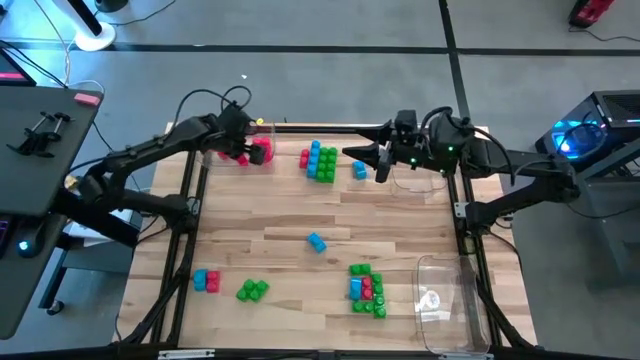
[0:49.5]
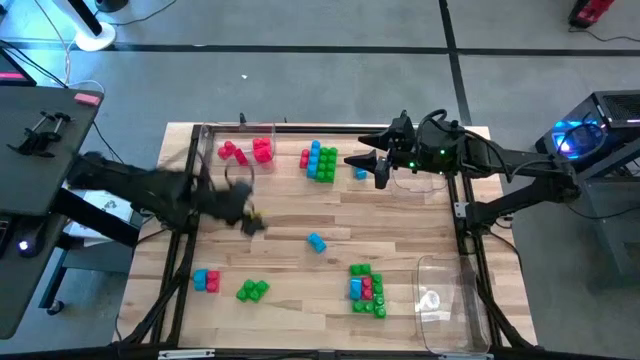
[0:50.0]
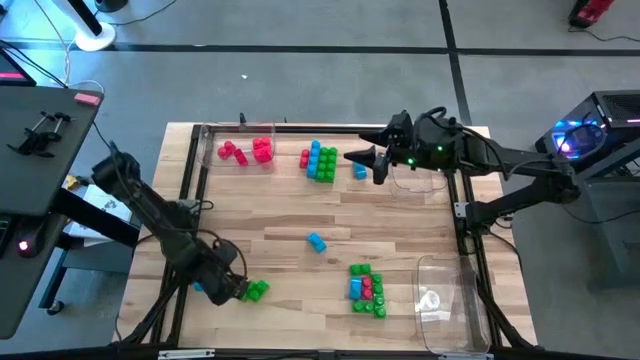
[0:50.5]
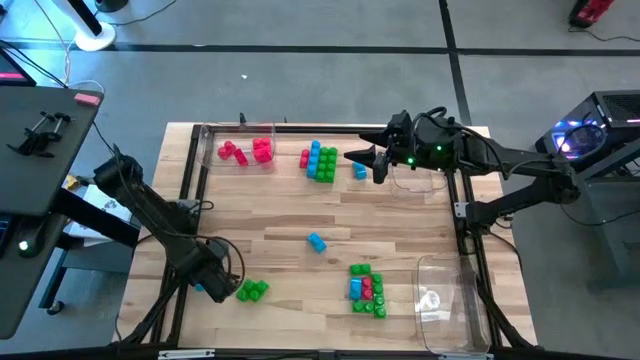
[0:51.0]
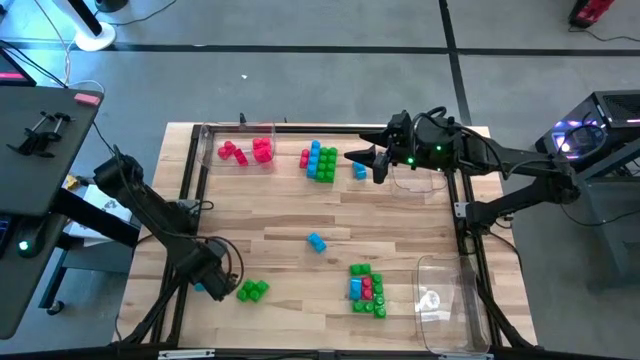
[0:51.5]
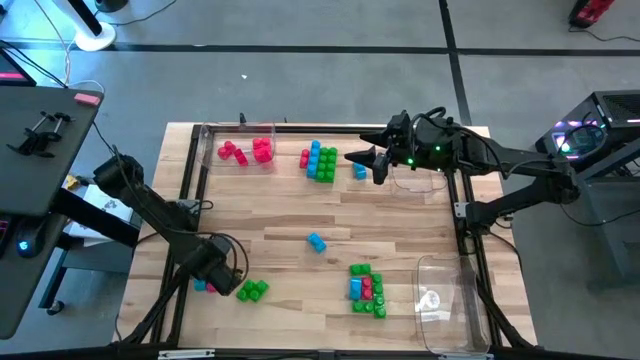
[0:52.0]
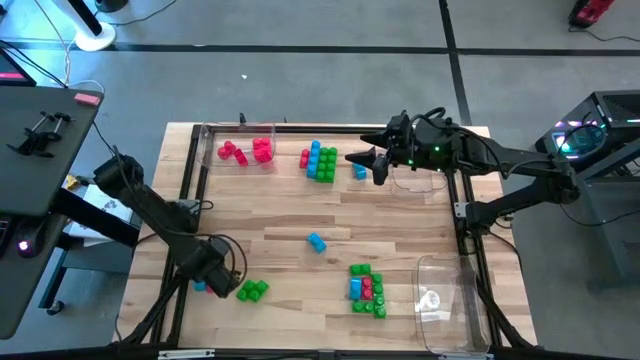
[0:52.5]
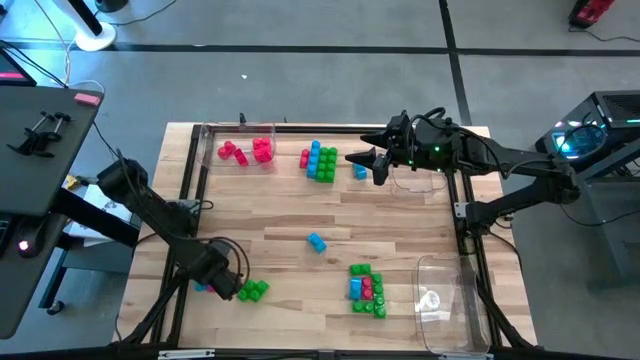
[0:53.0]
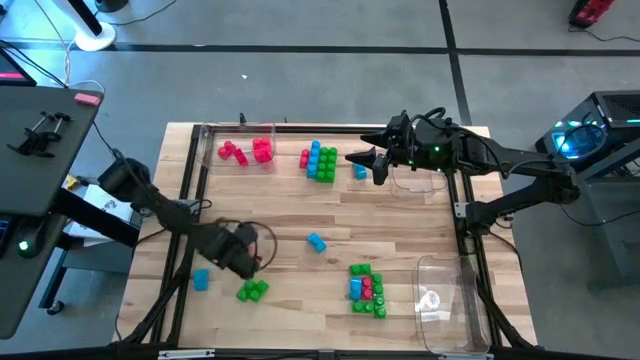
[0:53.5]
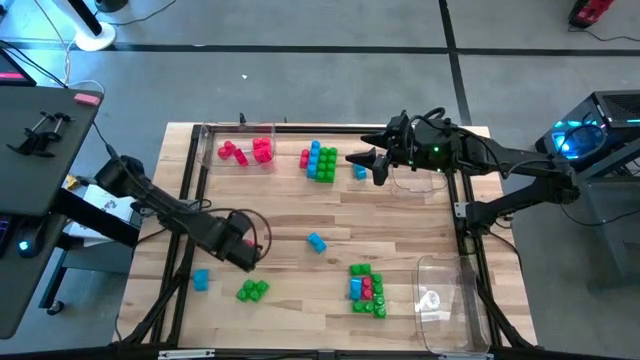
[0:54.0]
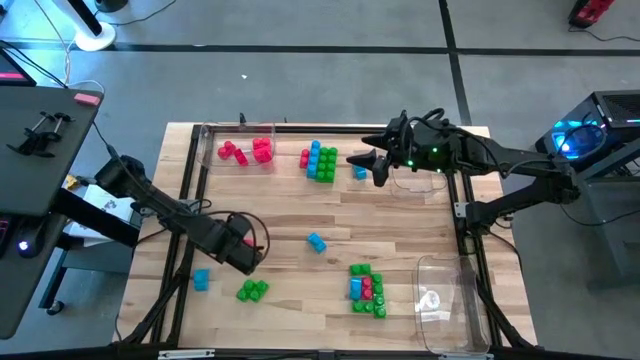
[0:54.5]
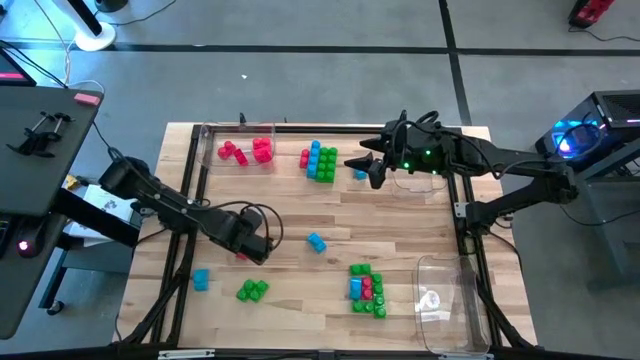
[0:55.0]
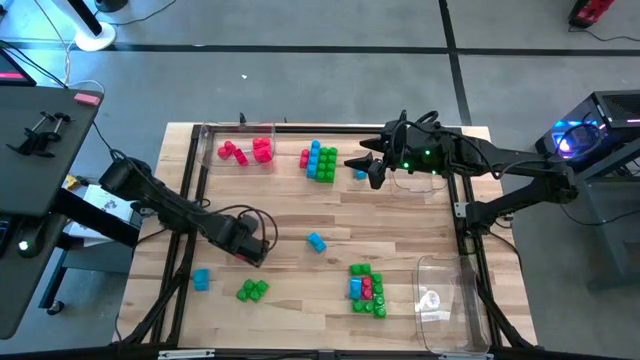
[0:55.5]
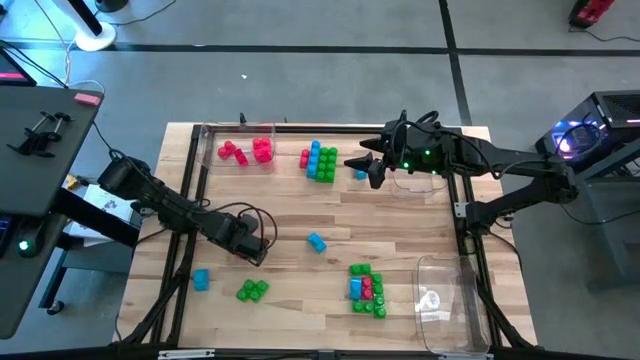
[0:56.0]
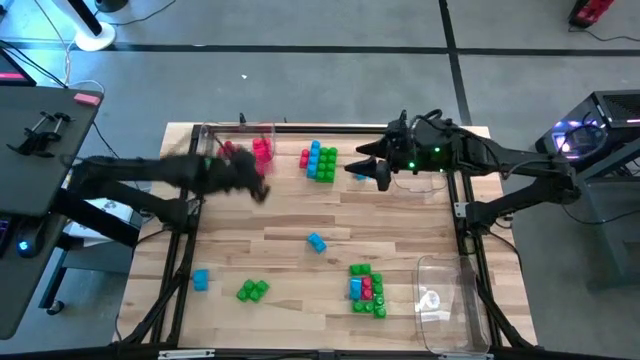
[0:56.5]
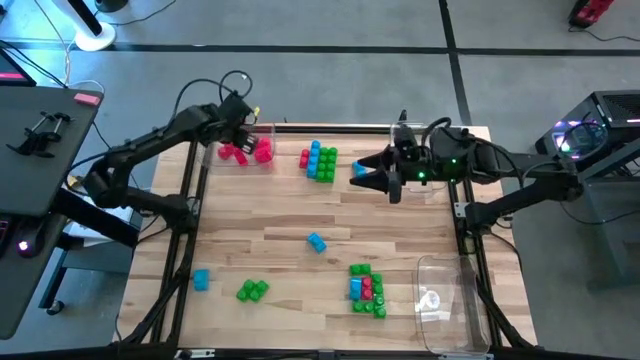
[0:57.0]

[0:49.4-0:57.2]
Task: Sort blocks
Put the game piece into the top left transparent bin

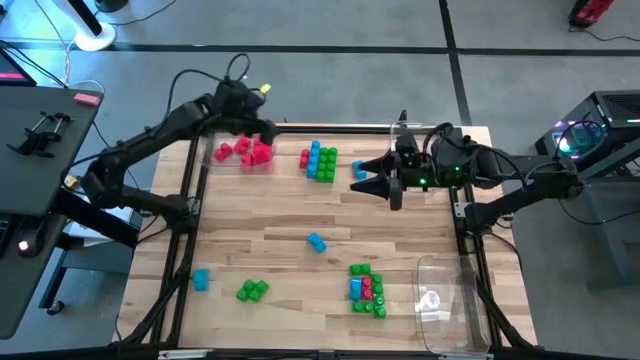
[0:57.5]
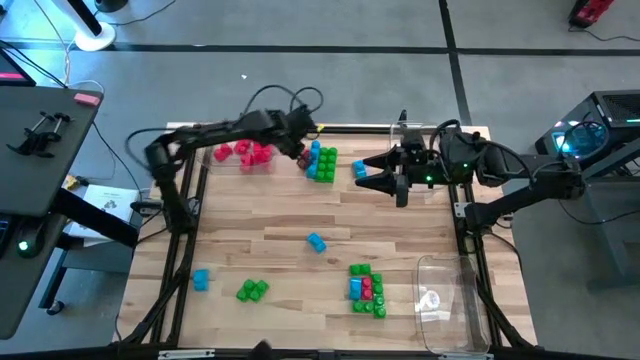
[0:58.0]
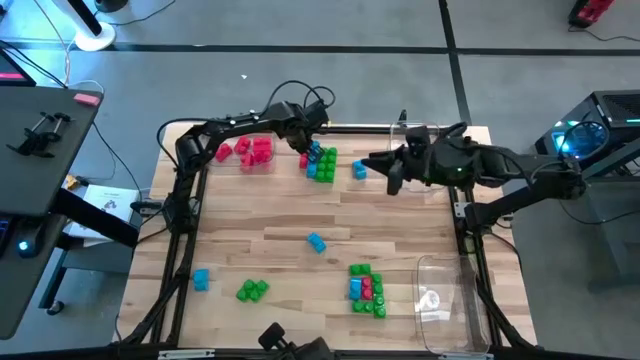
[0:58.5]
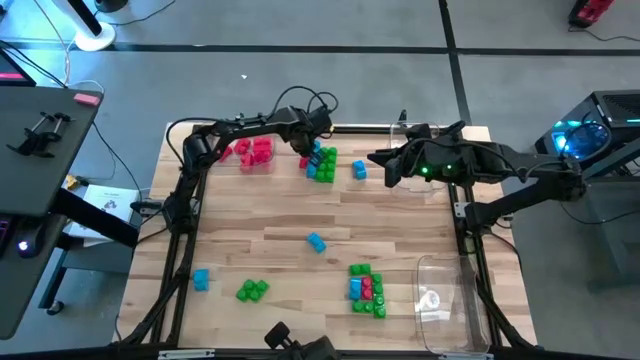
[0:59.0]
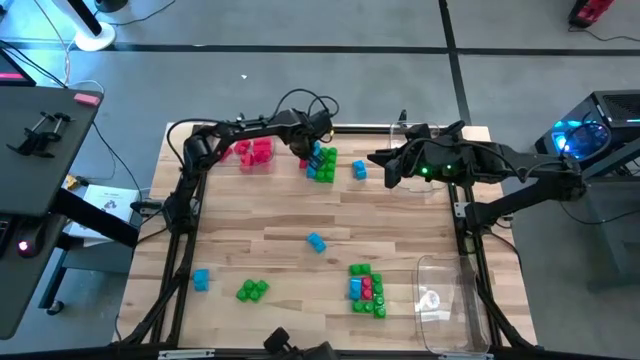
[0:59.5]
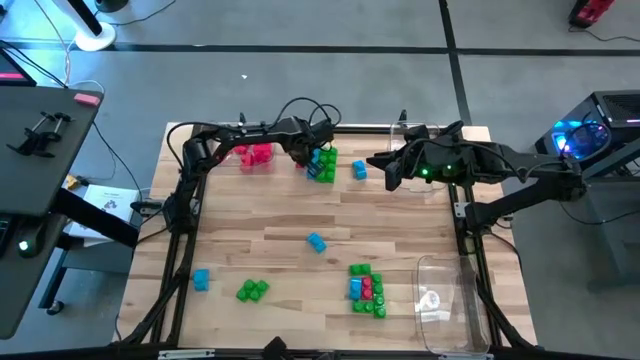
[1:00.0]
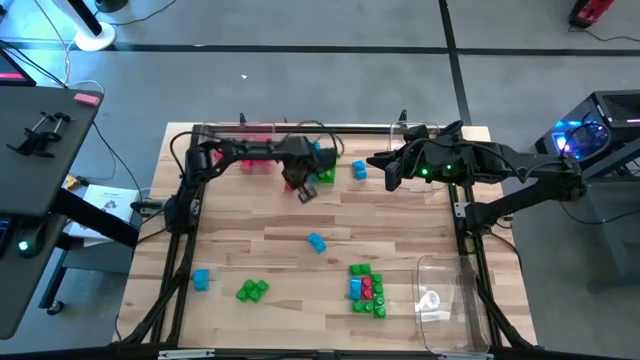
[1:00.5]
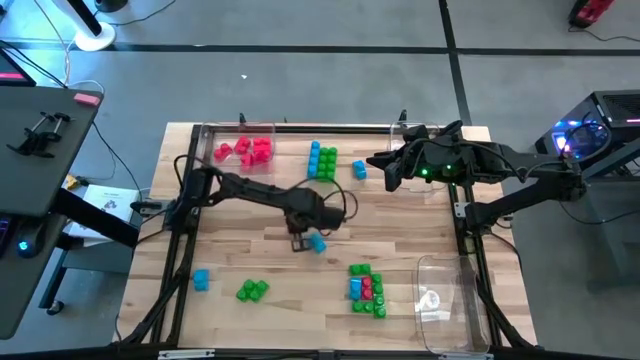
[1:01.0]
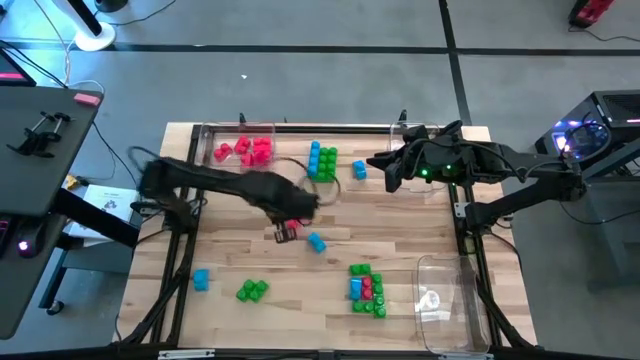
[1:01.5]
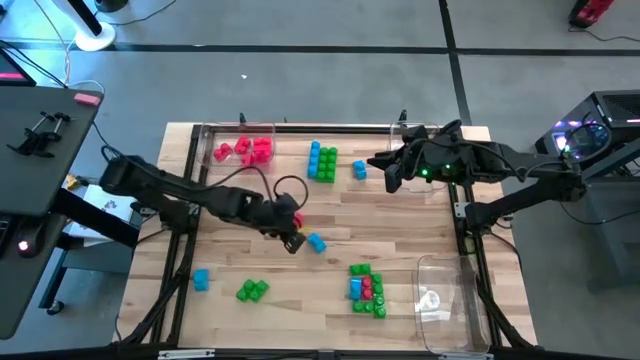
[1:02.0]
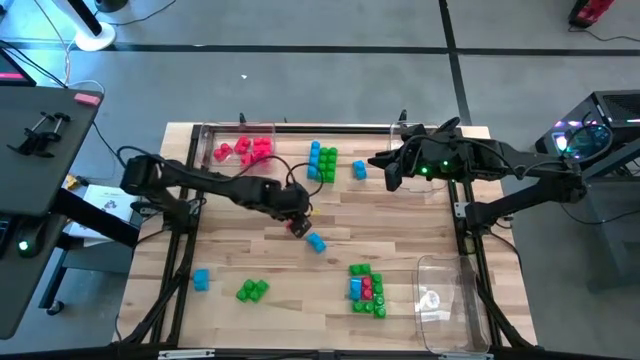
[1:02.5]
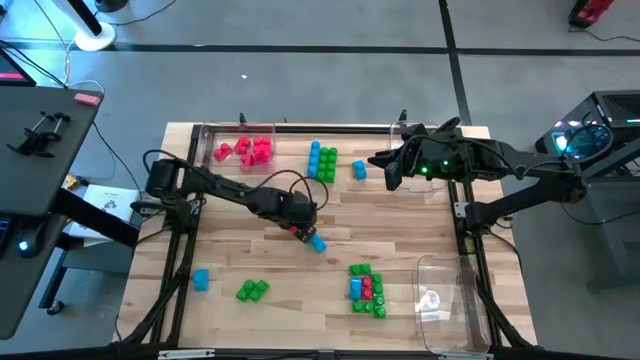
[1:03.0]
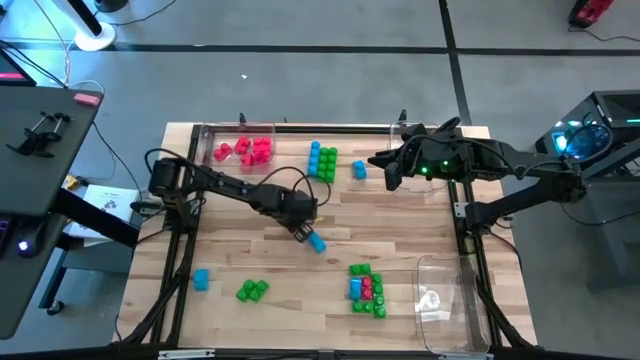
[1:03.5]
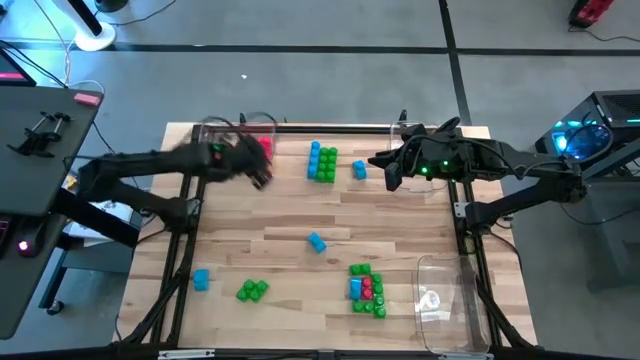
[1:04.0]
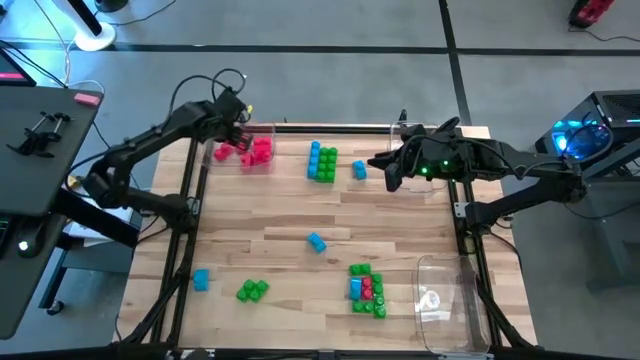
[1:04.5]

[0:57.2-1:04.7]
Put the game piece into the top left transparent bin

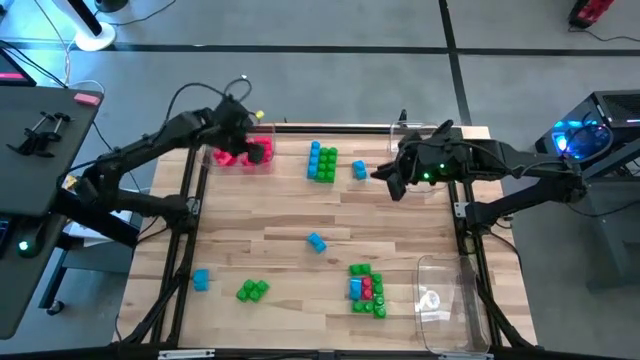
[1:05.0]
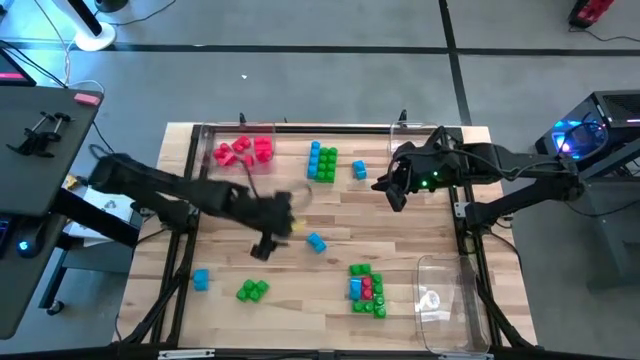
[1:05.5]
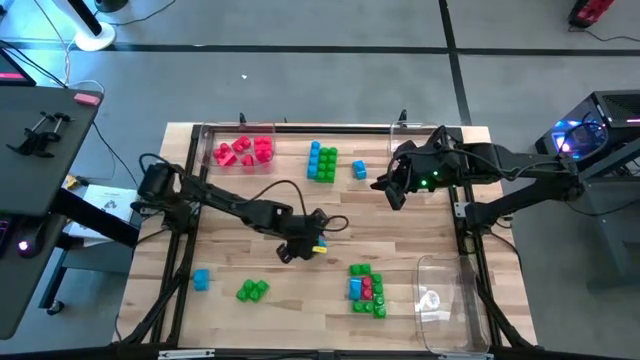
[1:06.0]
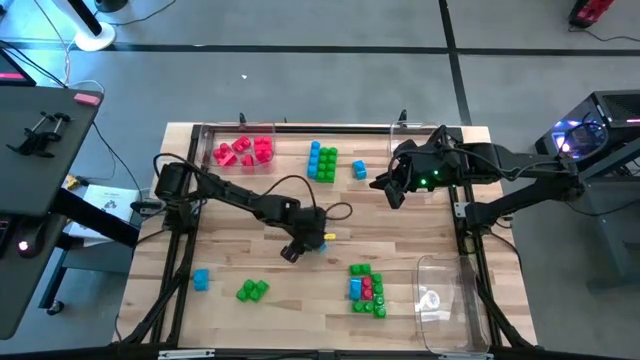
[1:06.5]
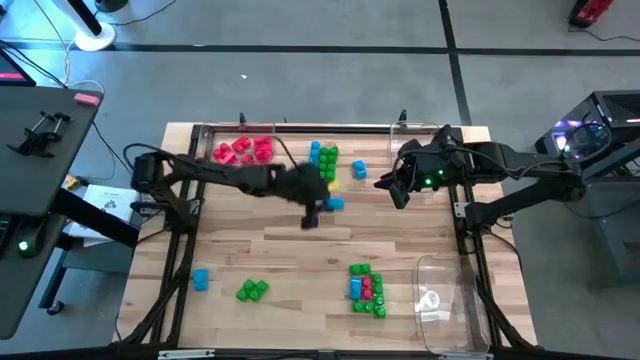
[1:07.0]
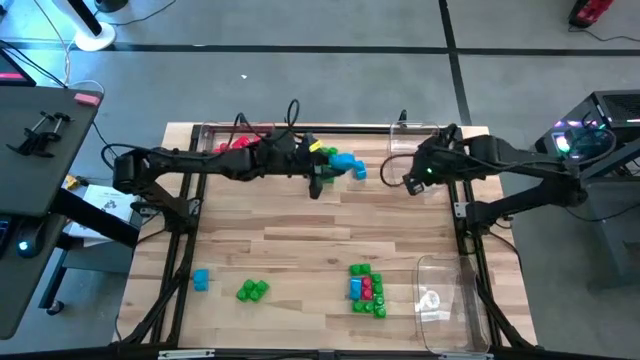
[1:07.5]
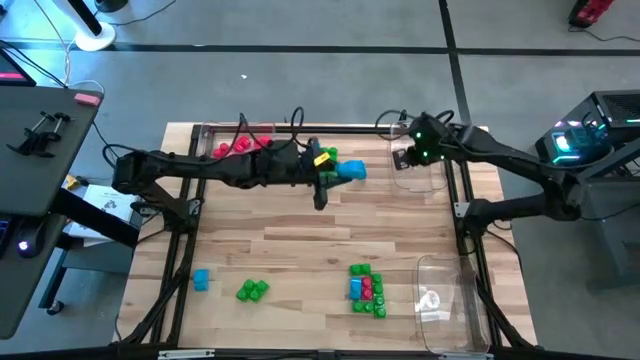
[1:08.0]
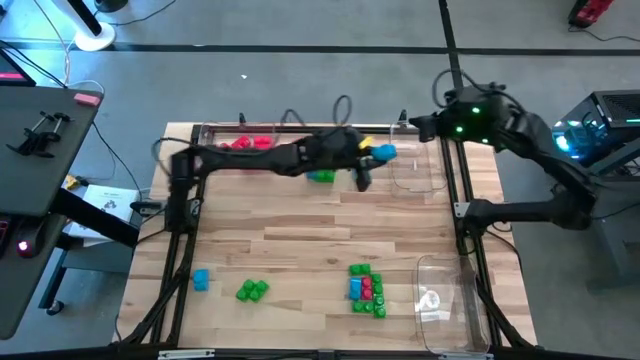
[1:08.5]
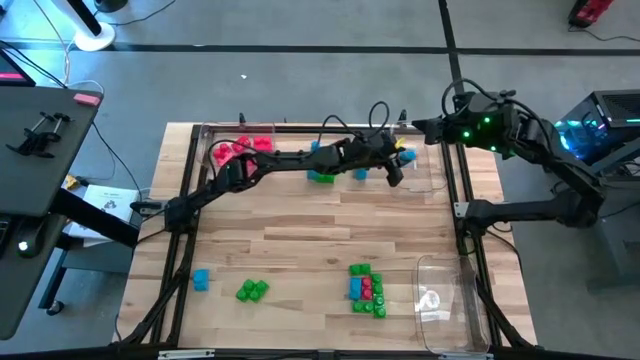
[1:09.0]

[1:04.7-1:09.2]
Put the blue game piece into the top right transparent bin

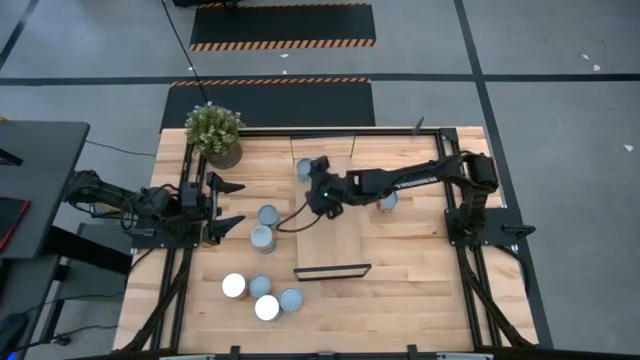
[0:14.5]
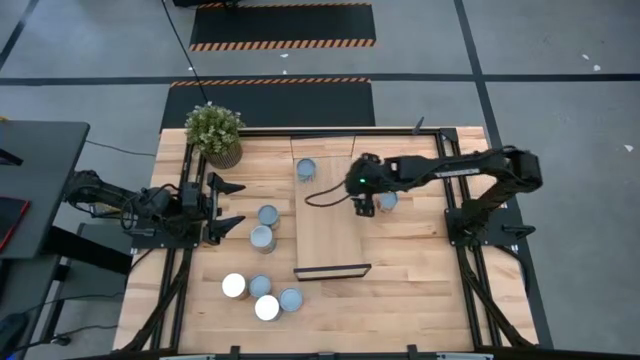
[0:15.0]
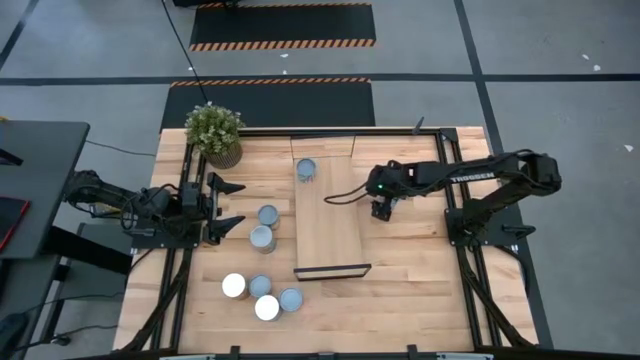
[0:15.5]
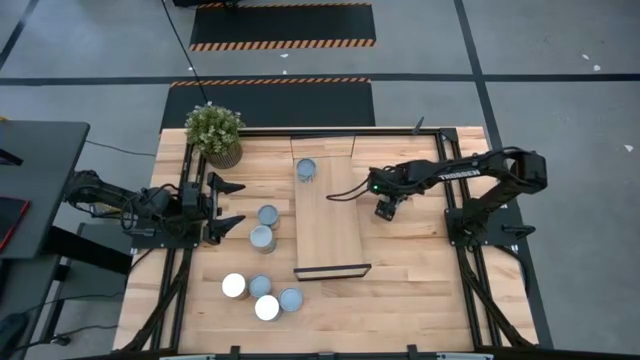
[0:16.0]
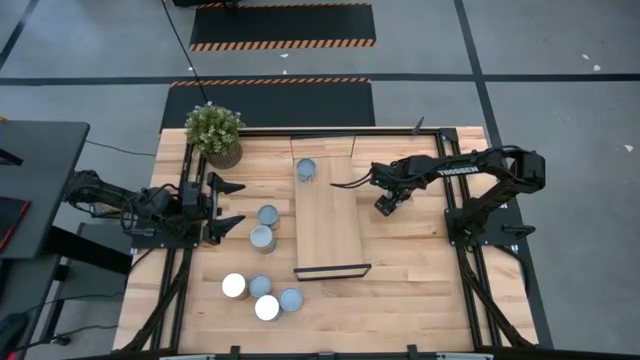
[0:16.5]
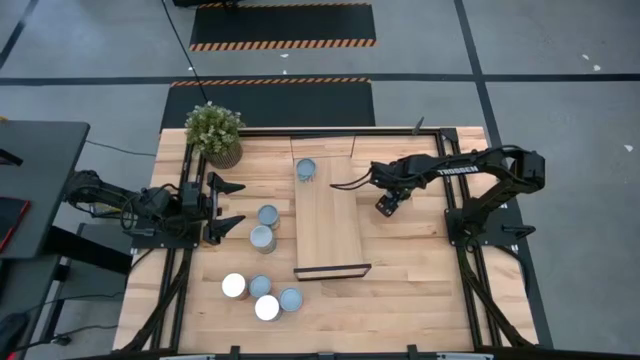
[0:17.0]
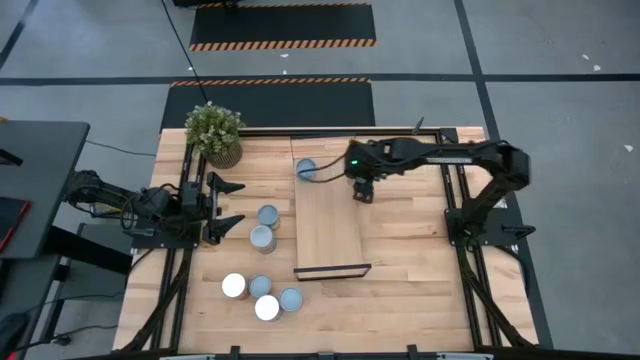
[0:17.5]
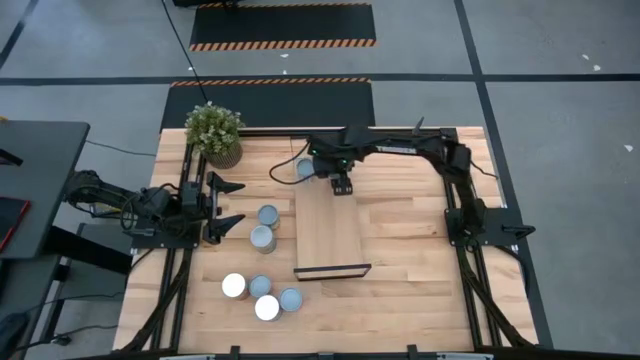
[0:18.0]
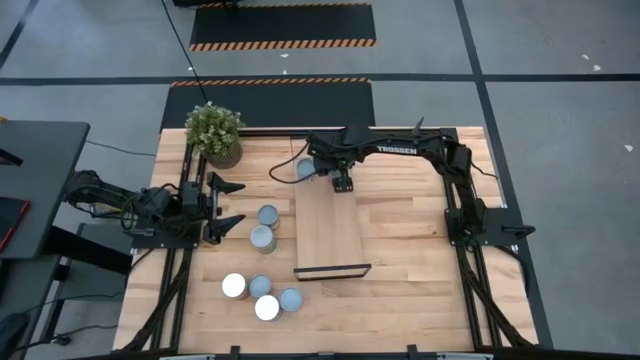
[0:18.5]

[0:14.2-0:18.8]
Task: Pick and place cans onto a shelf
Put the small canned tomato on the shelf
